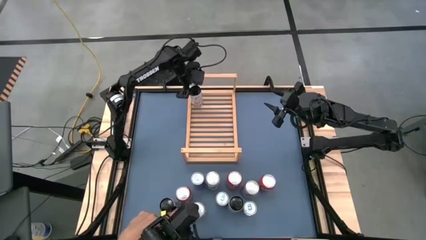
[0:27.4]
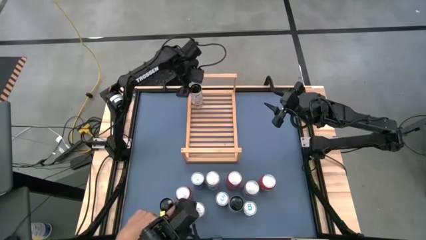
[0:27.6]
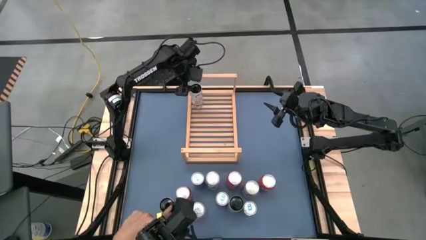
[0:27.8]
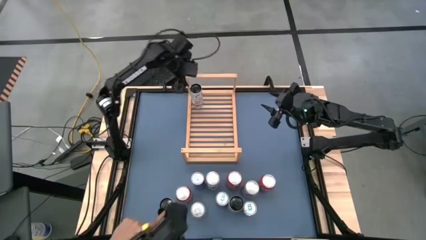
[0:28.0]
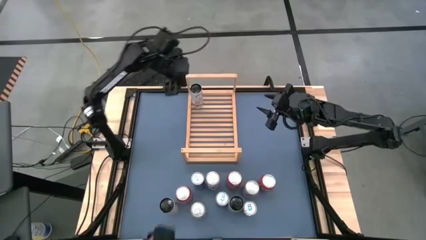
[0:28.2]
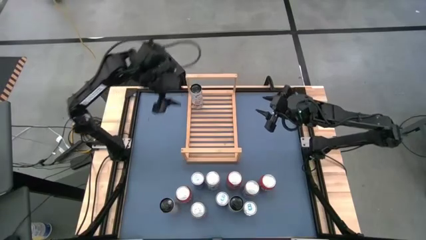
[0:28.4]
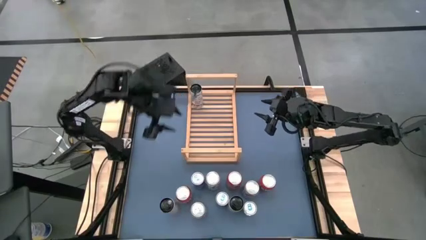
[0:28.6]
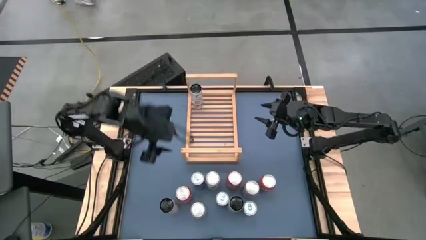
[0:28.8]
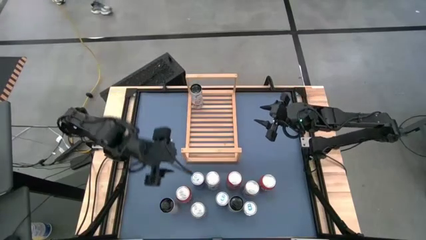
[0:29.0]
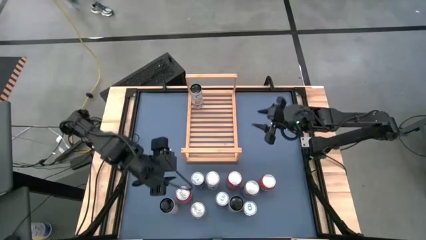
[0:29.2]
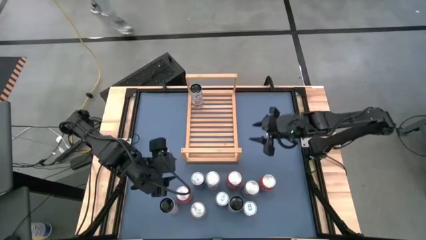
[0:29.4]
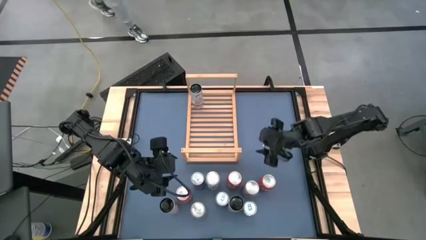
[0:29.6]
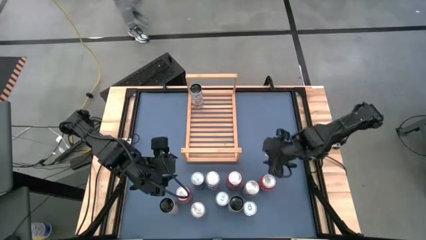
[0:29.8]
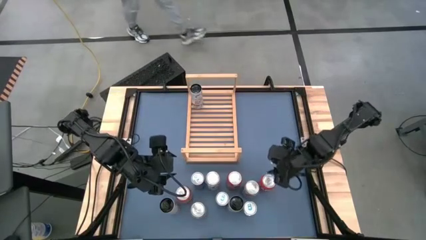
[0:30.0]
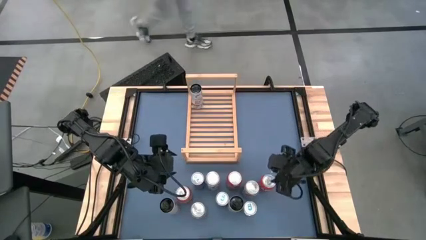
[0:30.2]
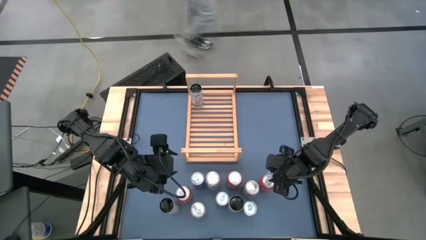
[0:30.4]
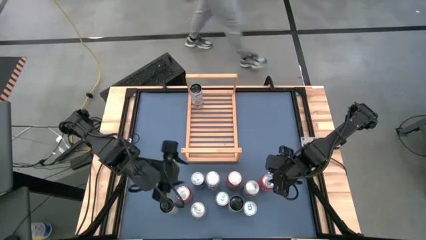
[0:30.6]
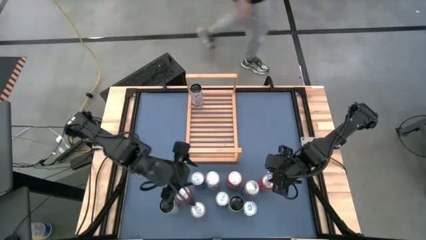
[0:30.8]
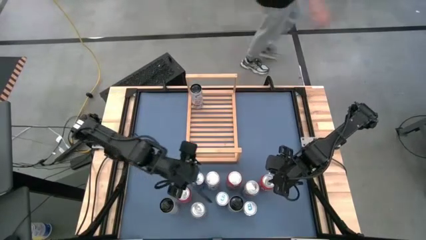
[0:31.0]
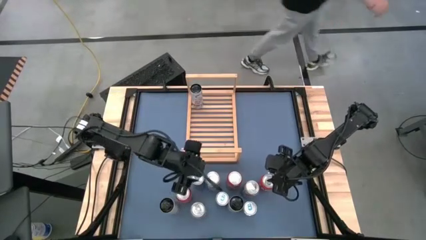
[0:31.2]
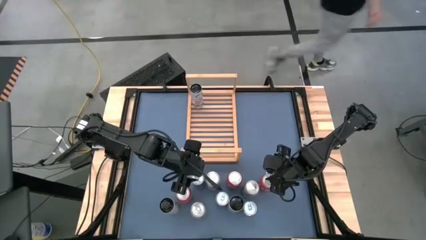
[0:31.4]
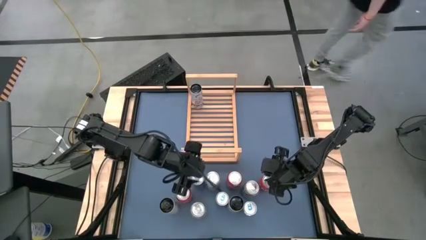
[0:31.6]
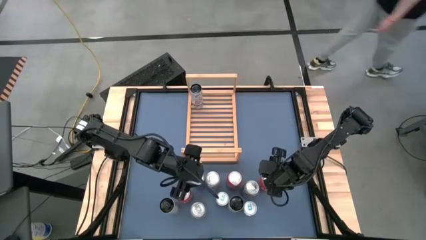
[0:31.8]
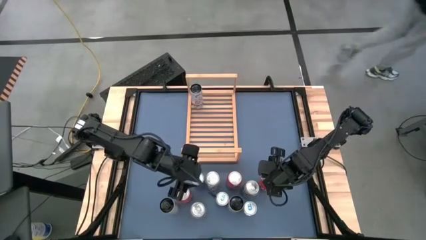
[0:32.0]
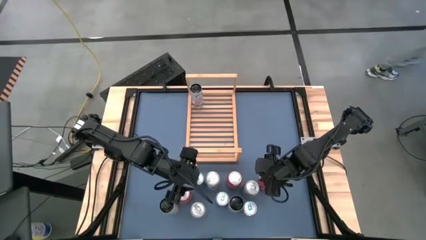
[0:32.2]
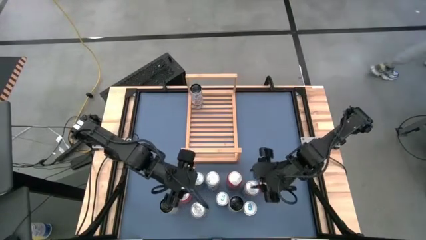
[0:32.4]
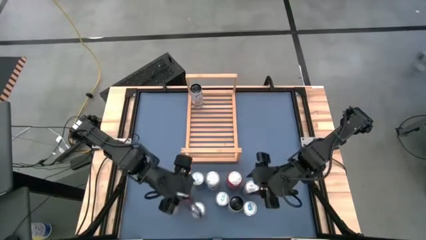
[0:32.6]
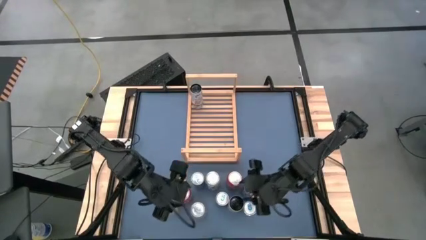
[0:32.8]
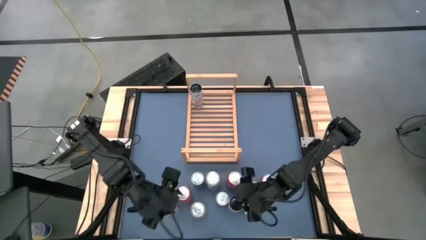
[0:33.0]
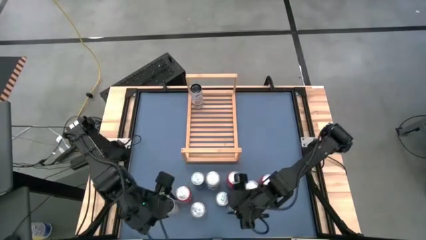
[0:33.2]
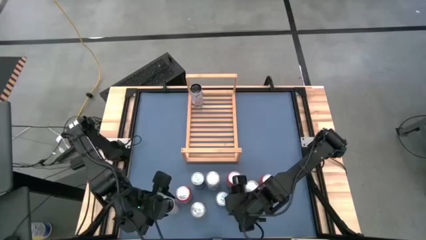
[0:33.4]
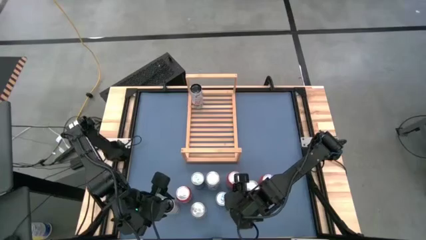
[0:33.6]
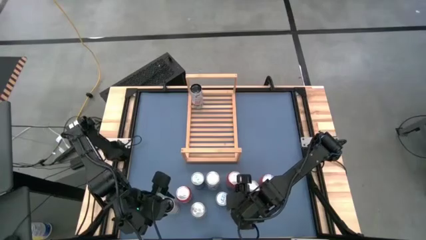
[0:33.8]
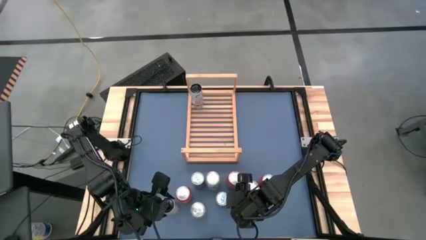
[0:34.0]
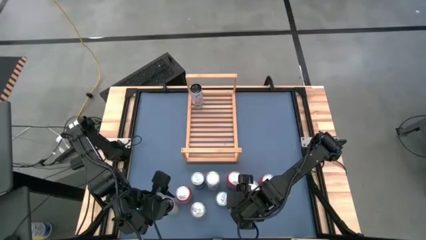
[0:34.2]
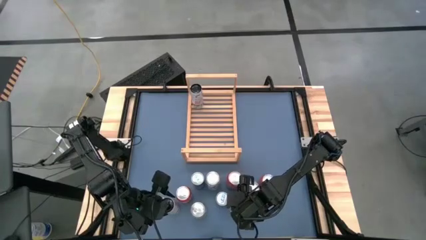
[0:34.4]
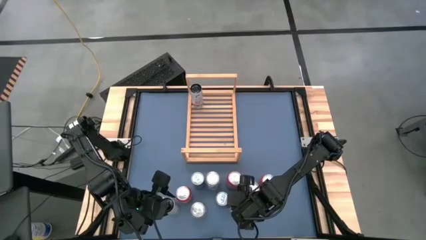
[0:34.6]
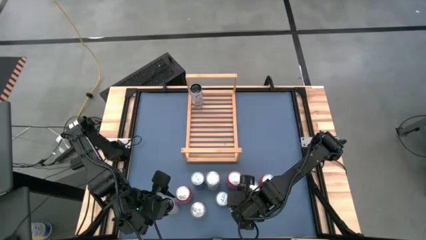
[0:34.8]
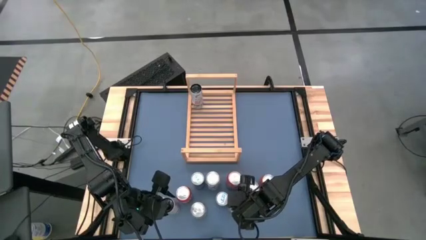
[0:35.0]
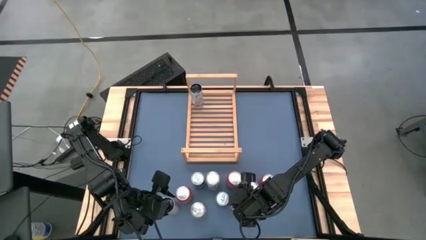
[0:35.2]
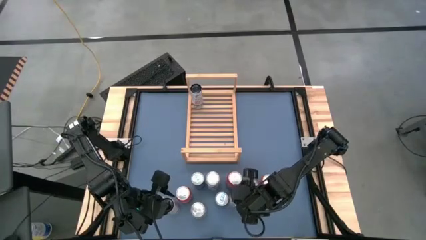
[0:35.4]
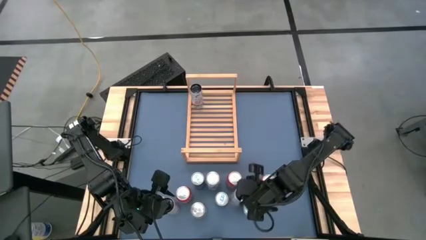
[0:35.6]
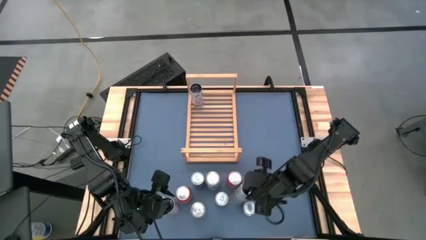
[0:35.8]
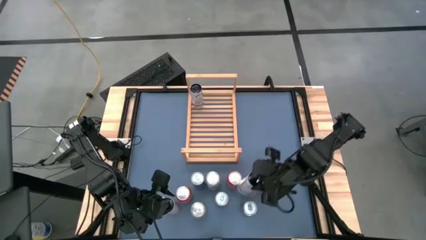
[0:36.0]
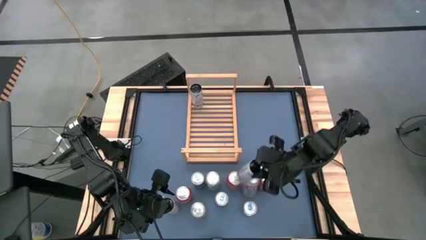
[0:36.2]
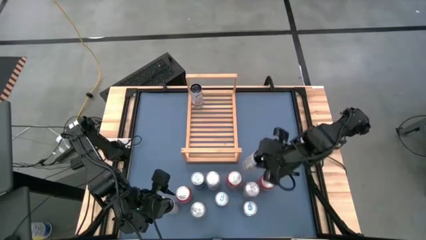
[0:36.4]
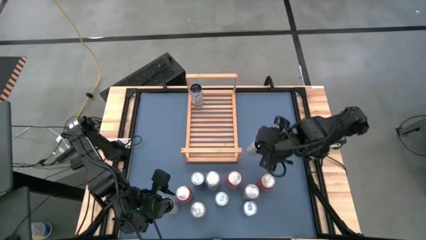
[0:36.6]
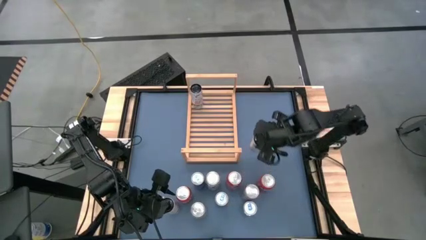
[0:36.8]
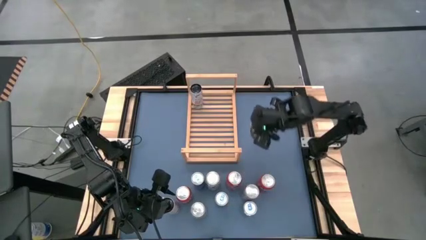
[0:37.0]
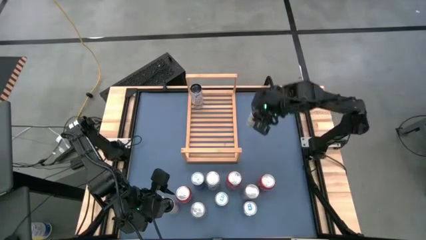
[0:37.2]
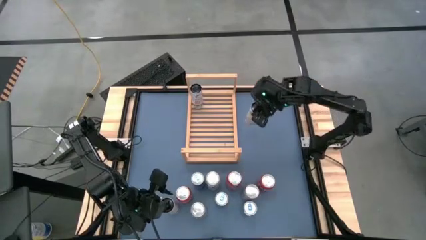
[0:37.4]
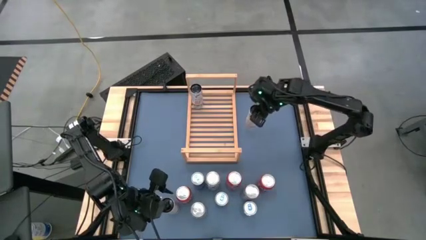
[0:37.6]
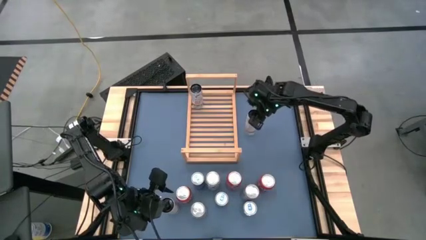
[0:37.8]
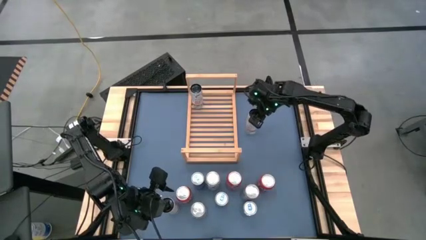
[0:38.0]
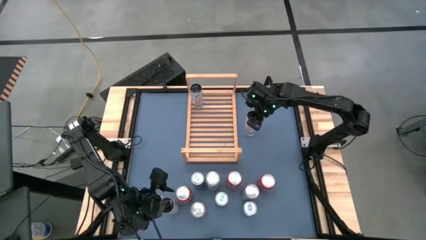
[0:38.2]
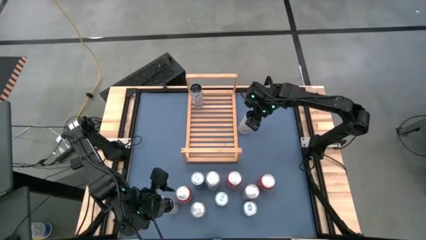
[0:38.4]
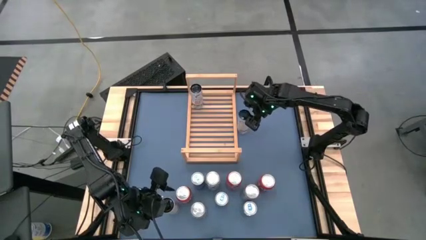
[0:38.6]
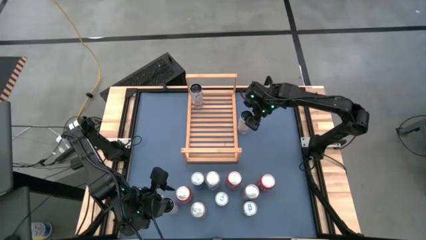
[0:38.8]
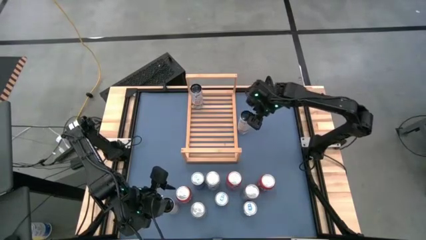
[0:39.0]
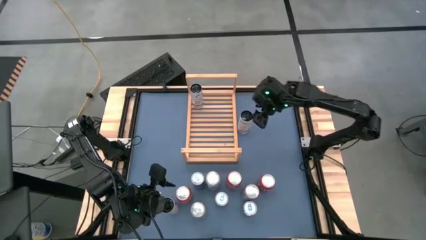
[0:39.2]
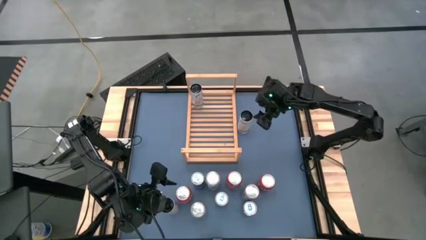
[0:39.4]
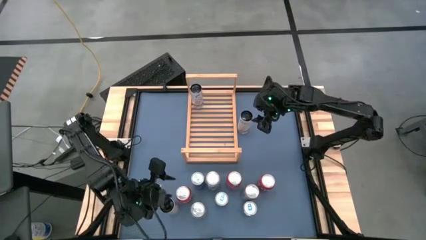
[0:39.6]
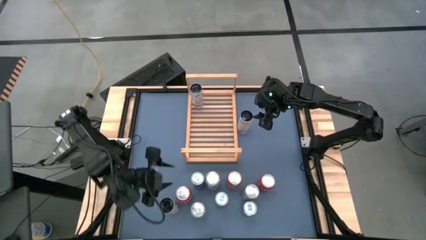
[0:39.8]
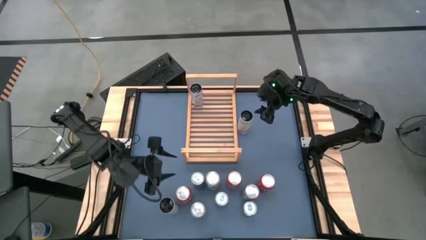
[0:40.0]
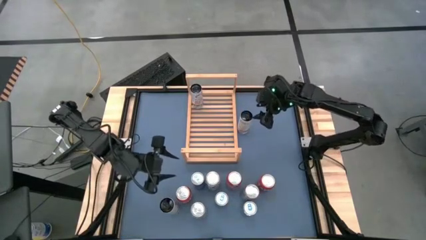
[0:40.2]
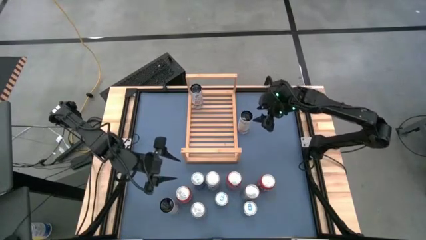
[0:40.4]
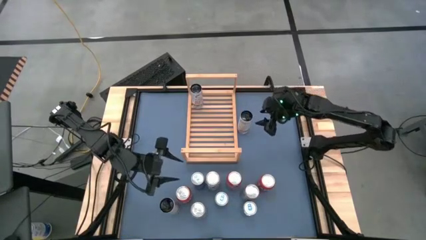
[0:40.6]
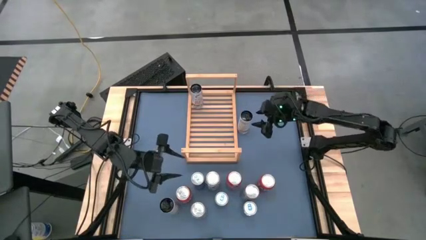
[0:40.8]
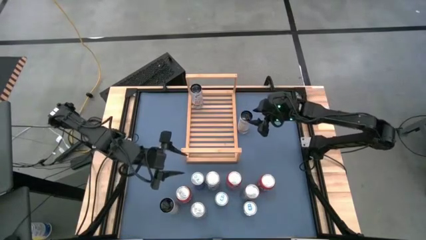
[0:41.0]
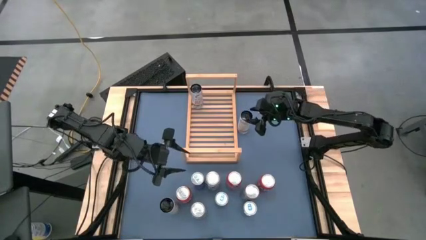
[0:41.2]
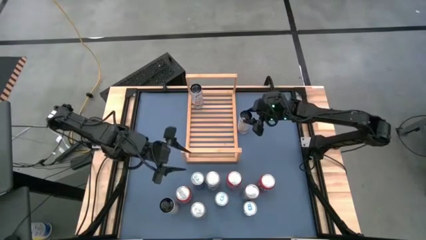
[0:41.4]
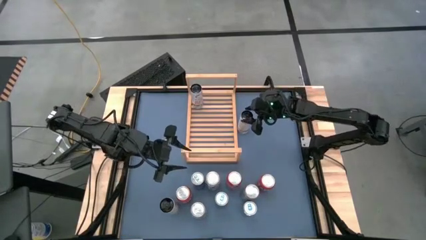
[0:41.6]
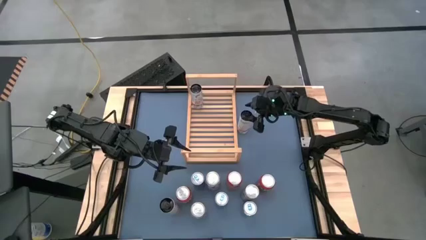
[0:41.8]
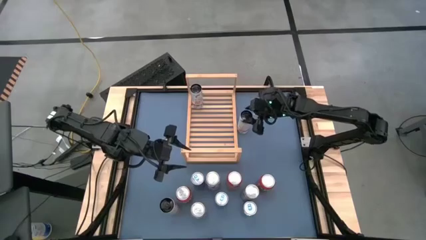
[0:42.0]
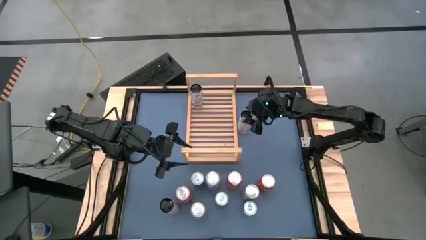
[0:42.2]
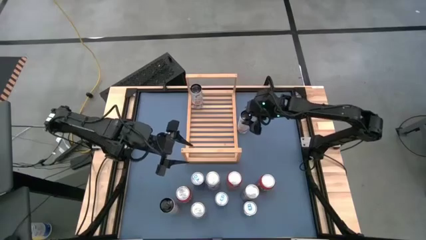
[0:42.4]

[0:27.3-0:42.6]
Task: Place canned beverage on shelf
Put the right white soda can on the shelf aligned with the other white soda can

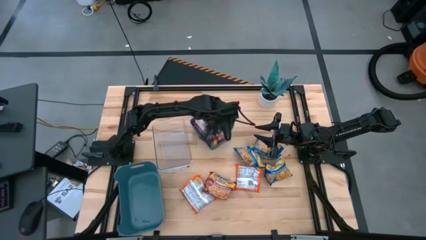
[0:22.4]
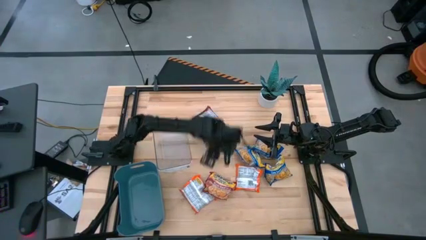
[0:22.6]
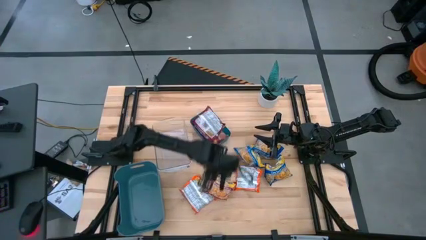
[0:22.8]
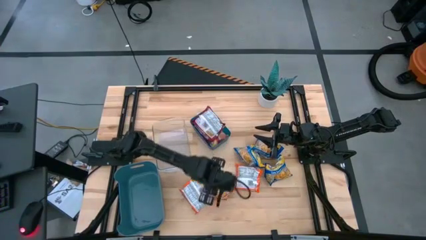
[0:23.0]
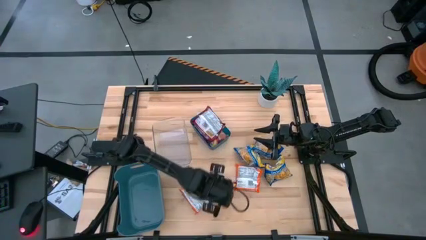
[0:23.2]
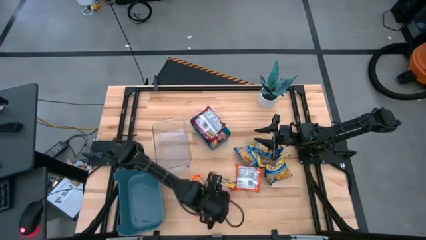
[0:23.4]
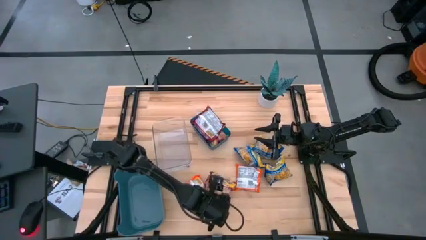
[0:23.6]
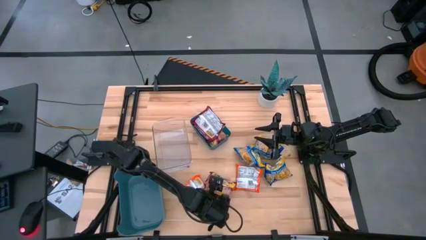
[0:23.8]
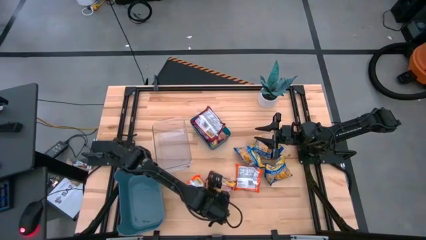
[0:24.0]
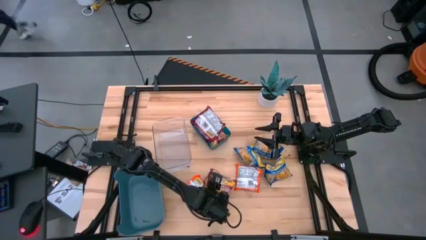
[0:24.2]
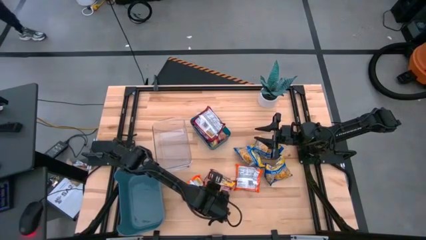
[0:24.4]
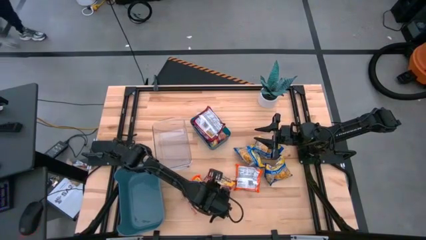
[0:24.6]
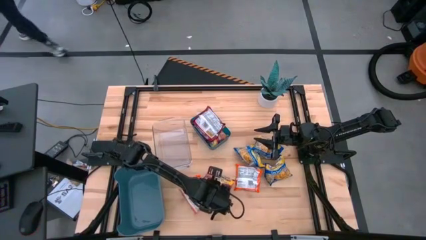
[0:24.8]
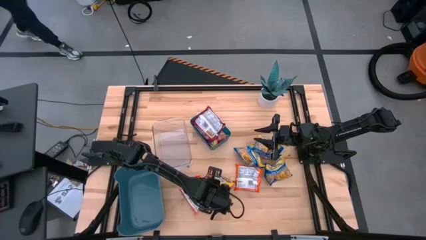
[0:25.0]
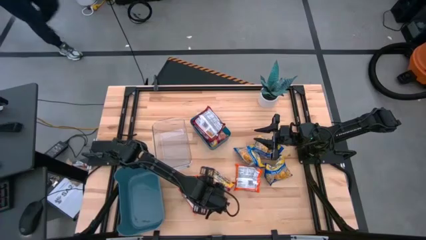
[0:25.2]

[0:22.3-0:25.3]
Task: Sort Maruchan noodles
Put the red noodle pack into the blue bin
